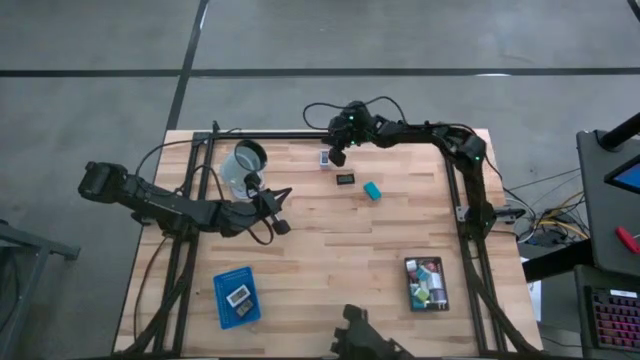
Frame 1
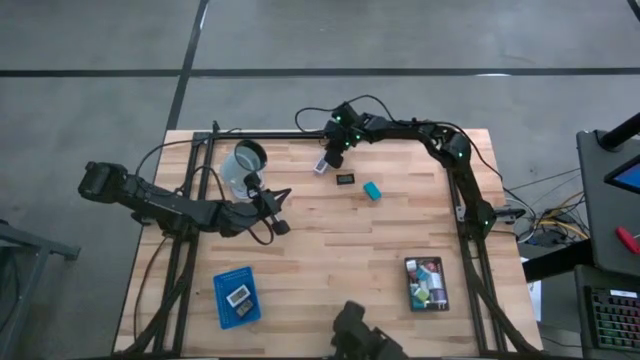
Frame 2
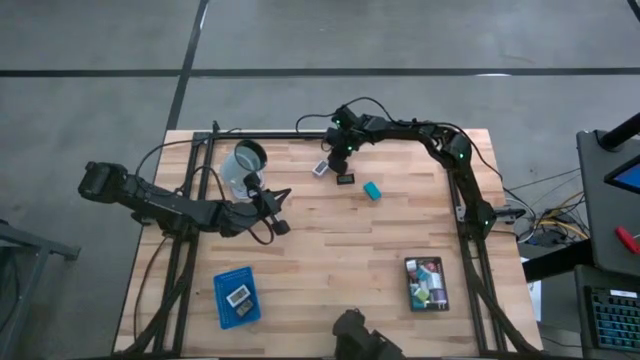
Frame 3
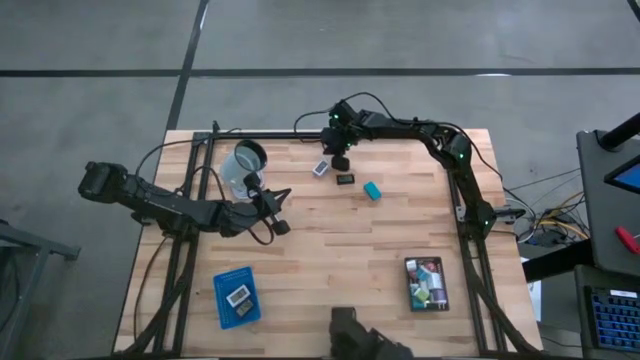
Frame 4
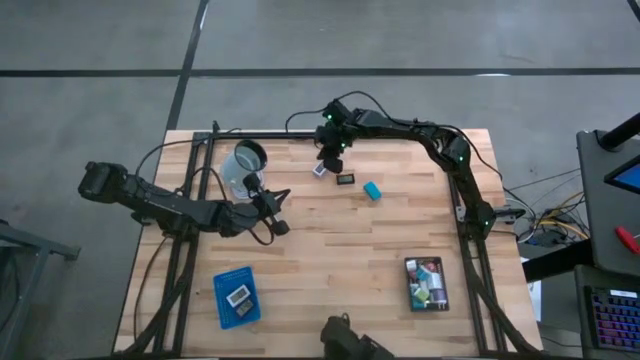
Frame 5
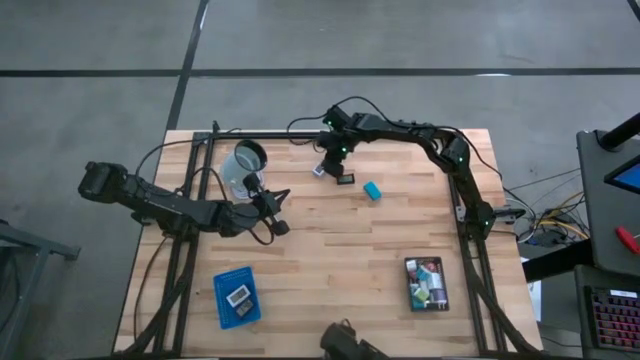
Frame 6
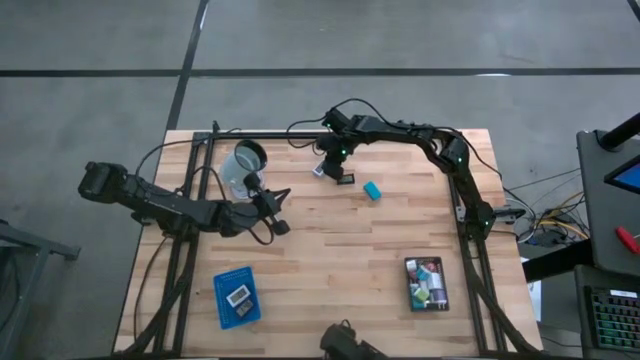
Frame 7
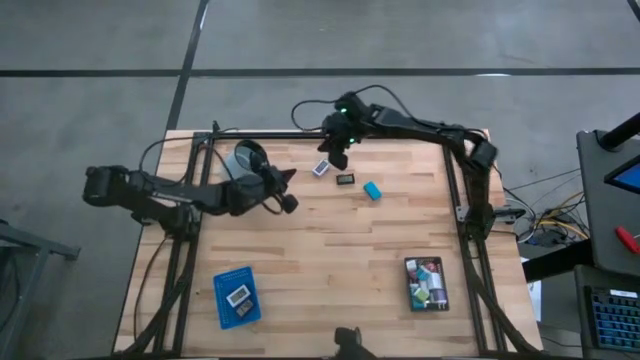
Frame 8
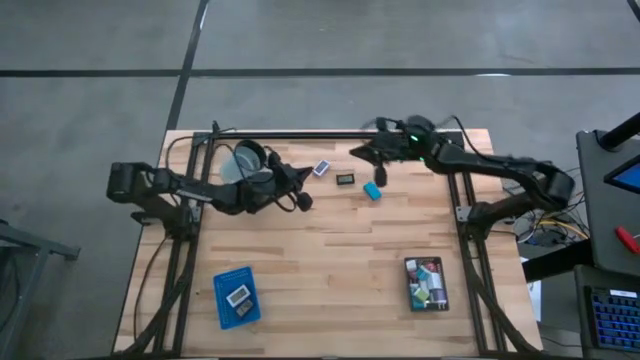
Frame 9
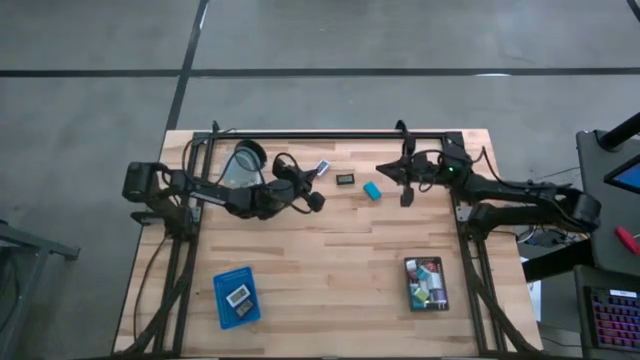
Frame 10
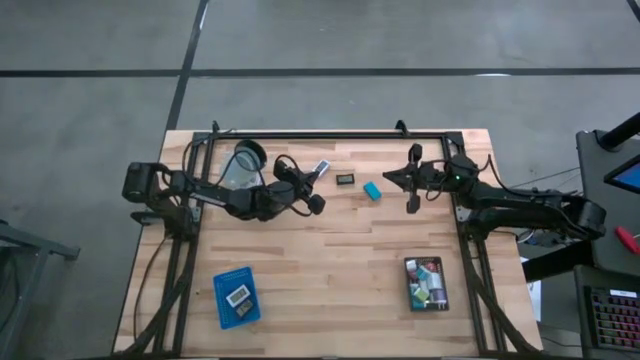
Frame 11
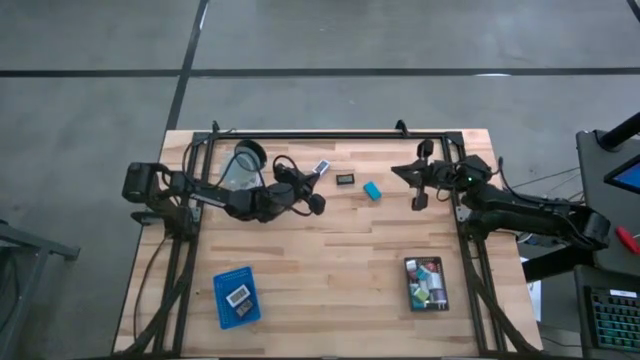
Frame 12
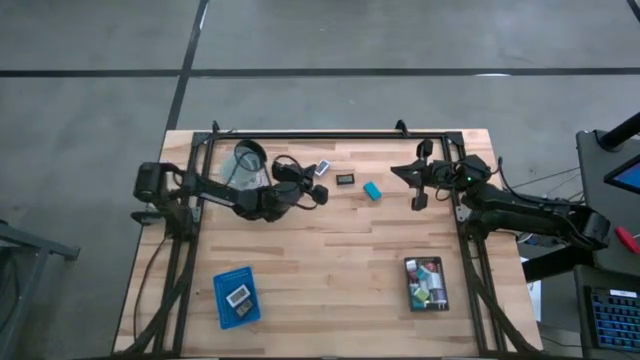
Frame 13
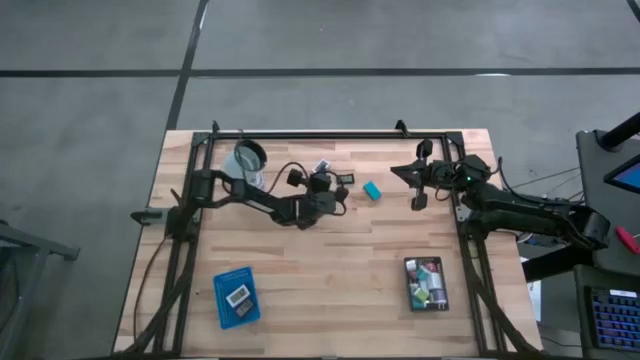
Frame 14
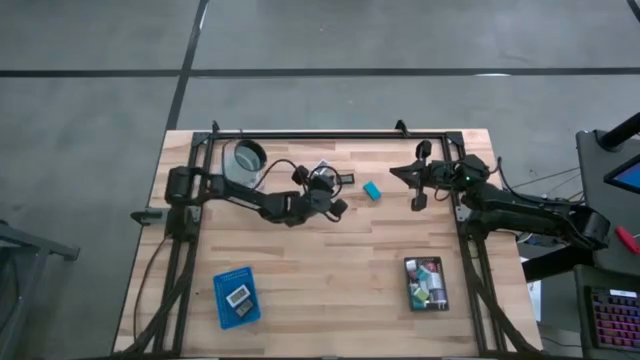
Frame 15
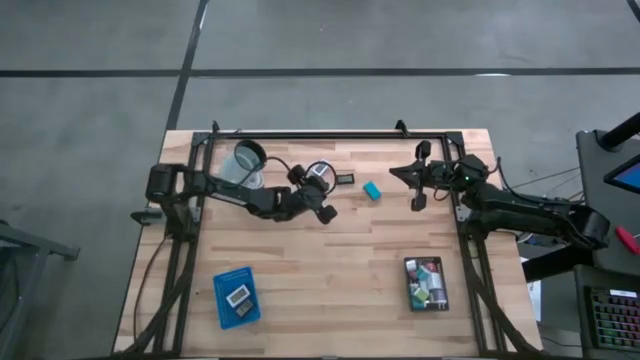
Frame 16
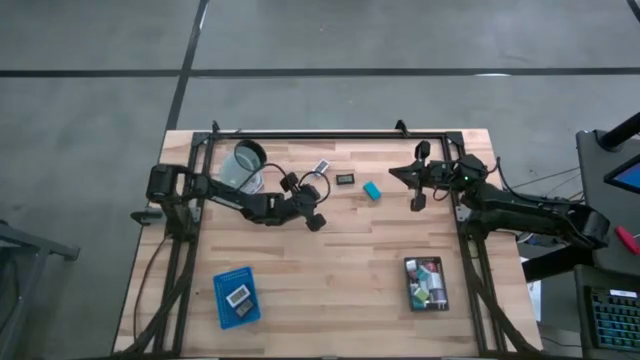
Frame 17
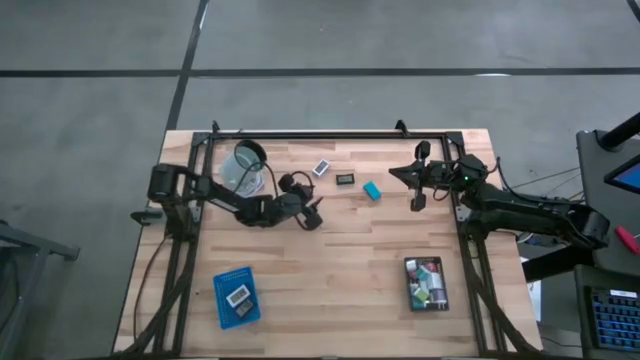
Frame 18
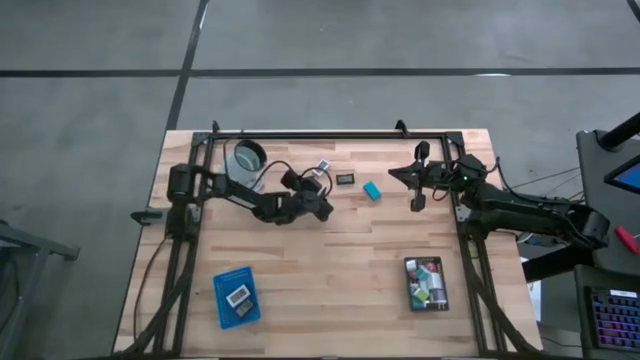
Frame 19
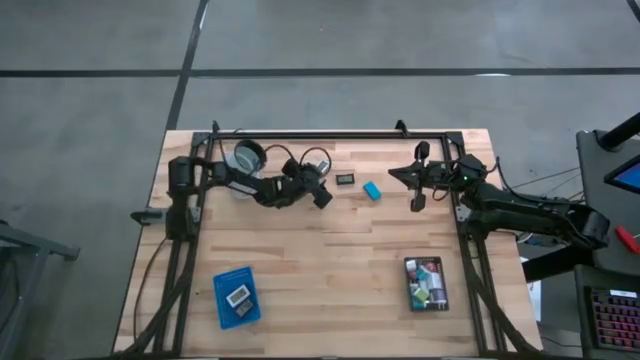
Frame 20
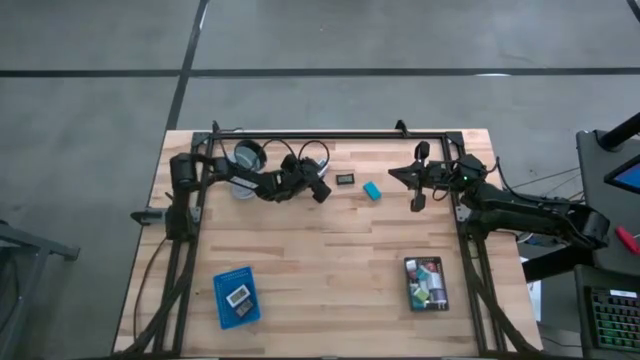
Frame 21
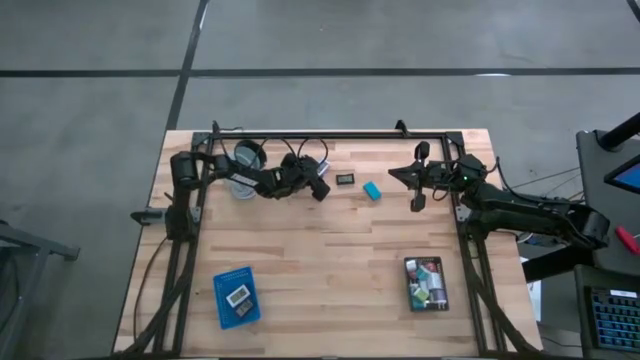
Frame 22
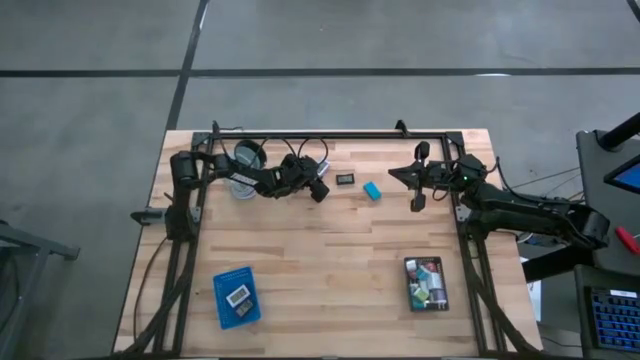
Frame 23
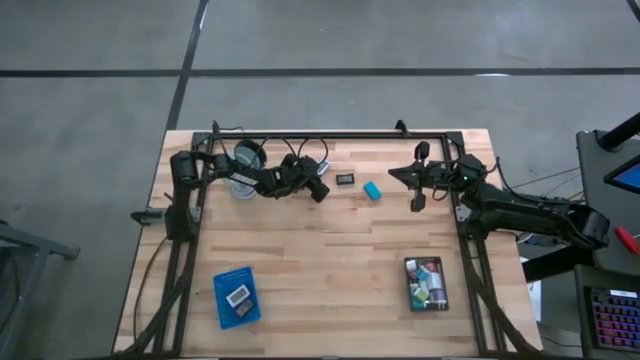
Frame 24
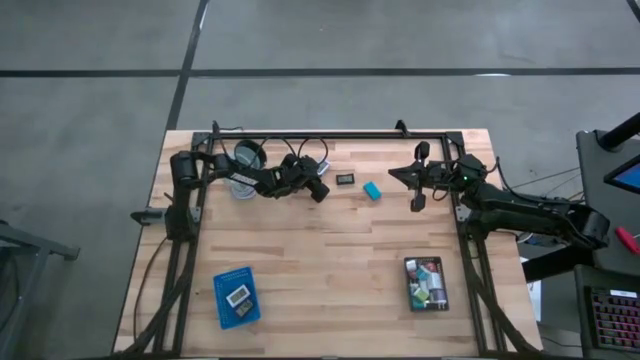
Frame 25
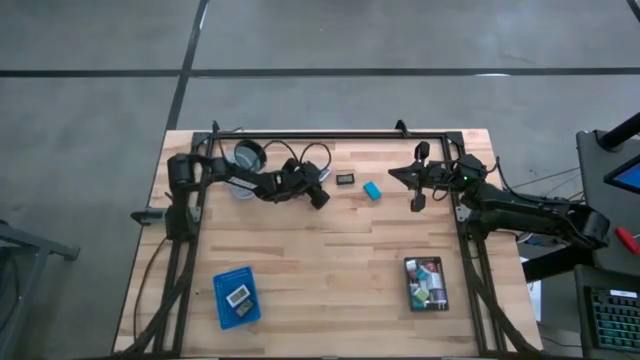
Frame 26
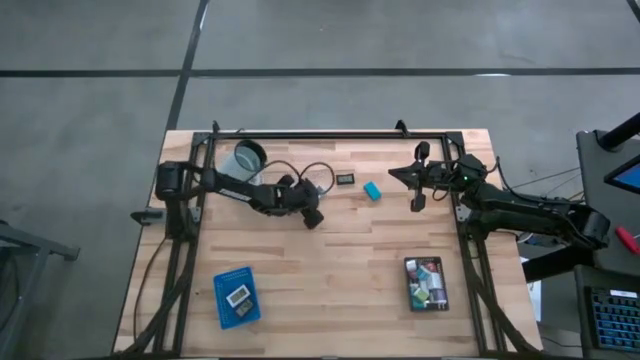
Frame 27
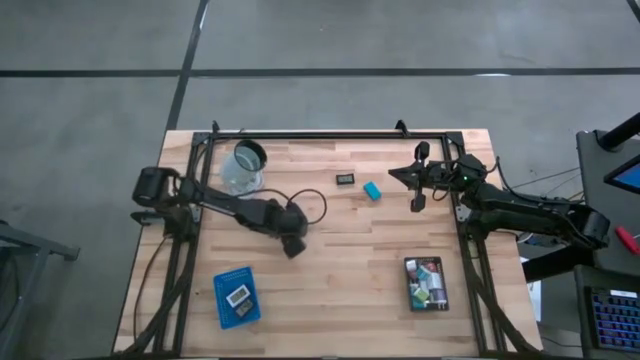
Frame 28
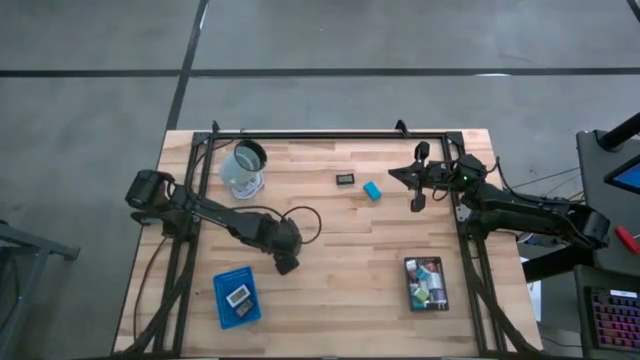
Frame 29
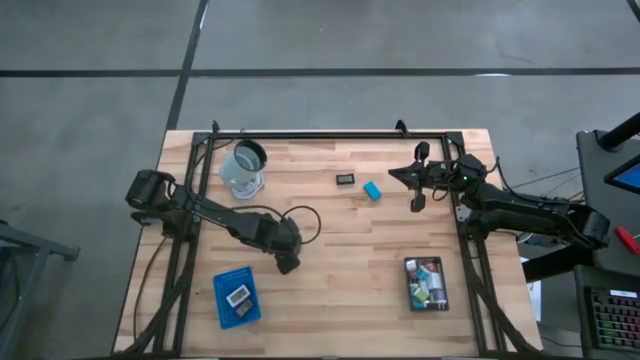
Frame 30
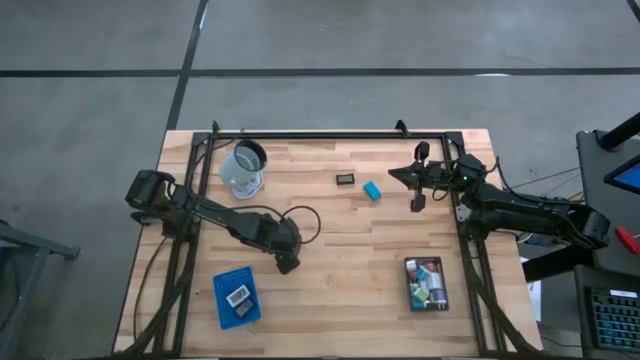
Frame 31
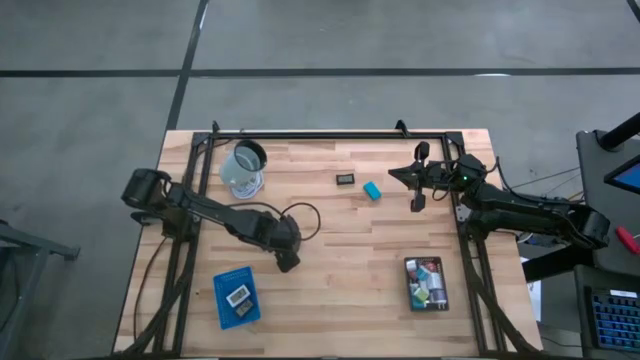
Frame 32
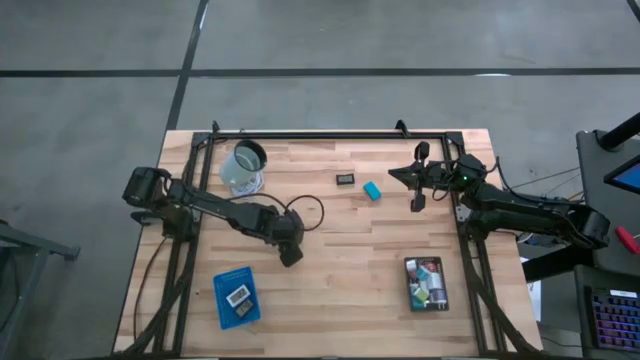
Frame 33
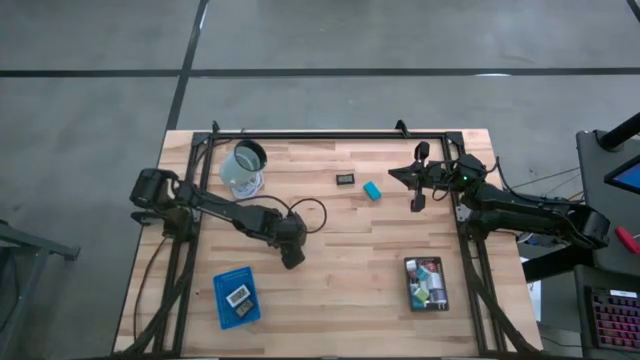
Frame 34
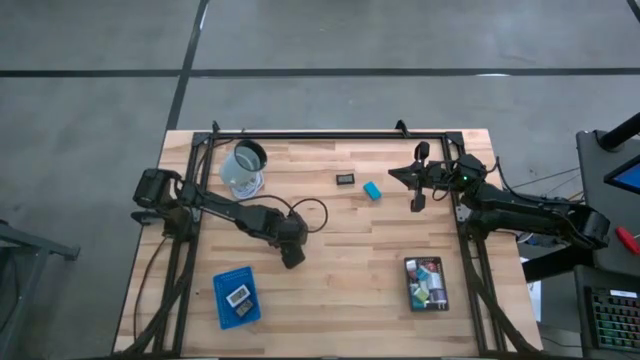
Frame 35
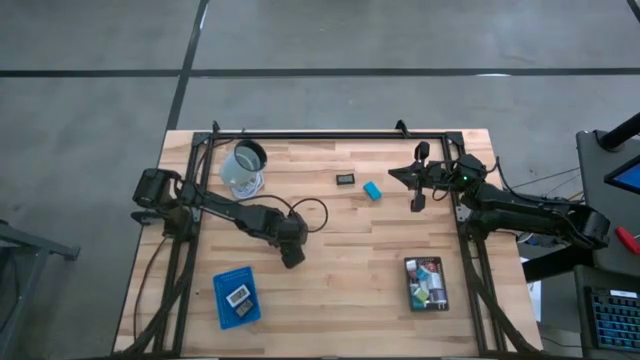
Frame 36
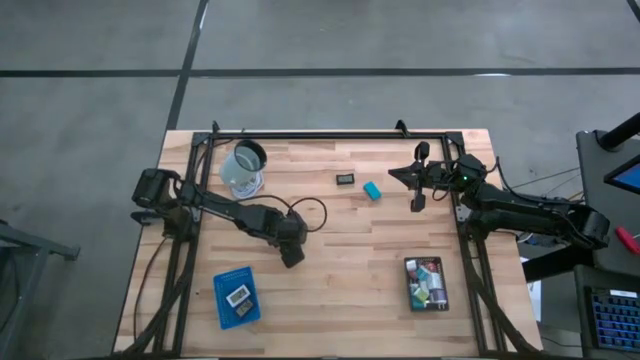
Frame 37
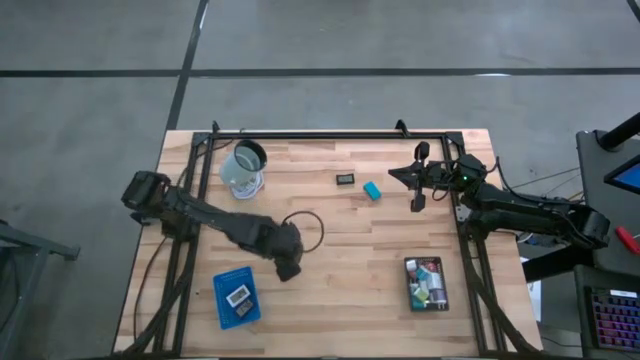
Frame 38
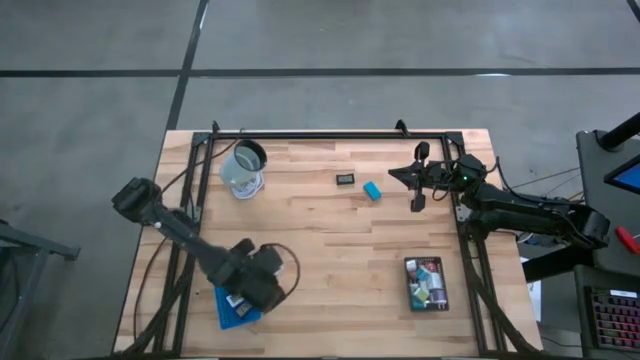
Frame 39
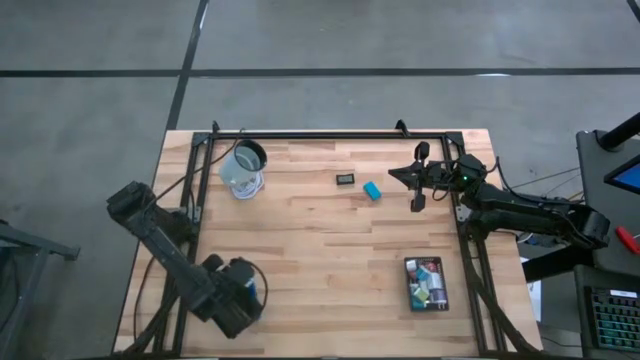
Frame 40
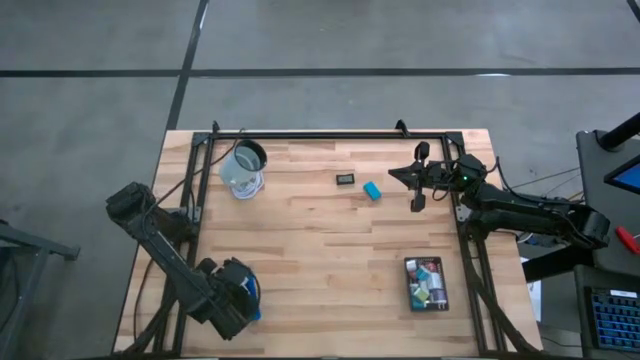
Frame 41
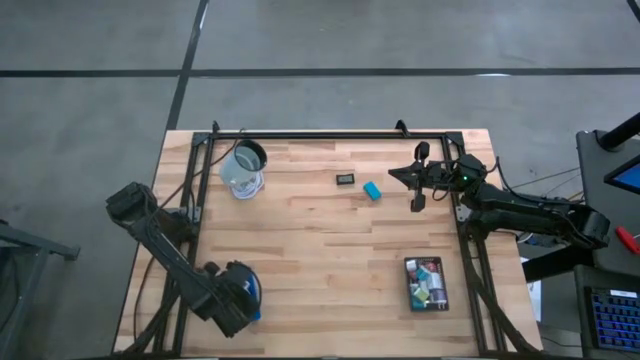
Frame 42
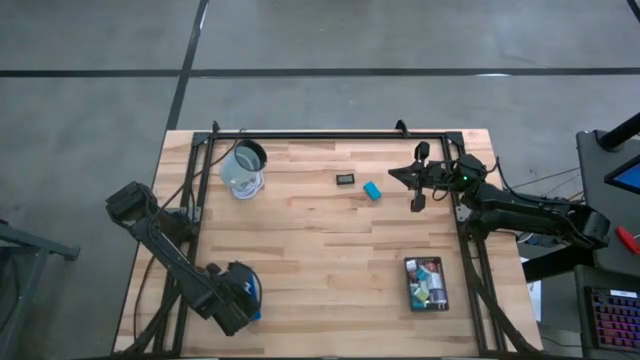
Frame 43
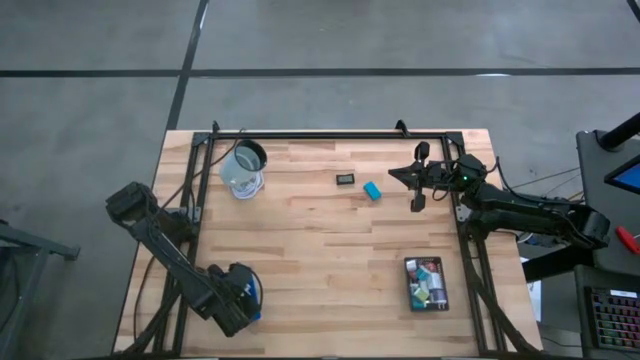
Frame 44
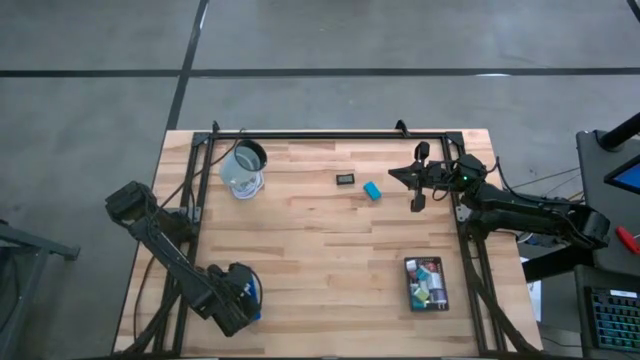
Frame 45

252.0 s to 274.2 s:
Task: Pick & Place Office items
Put the white digital clock into the blue bin
